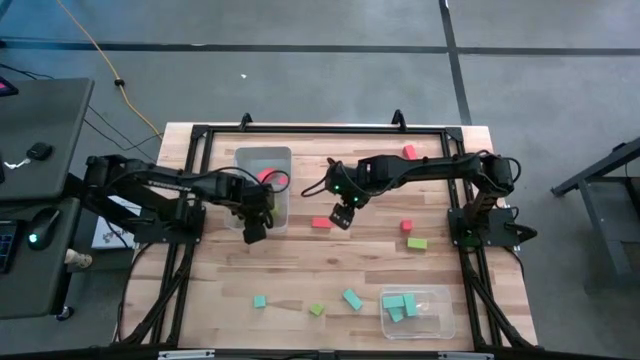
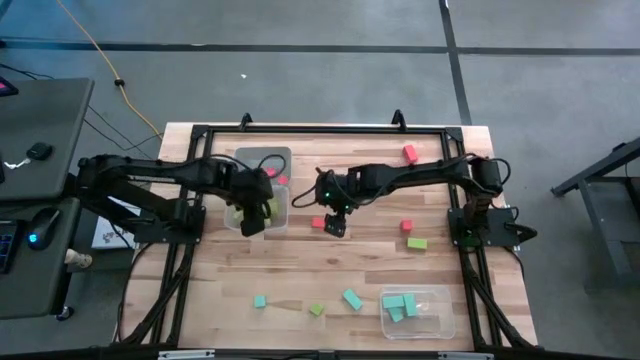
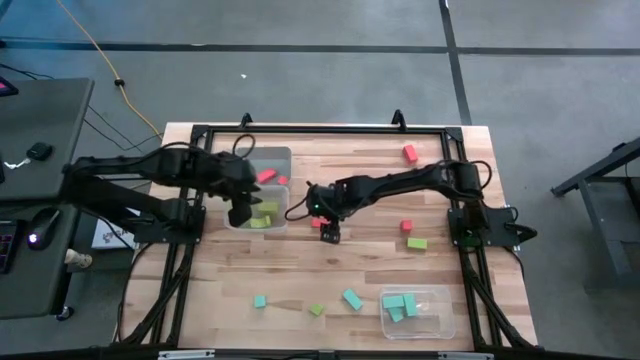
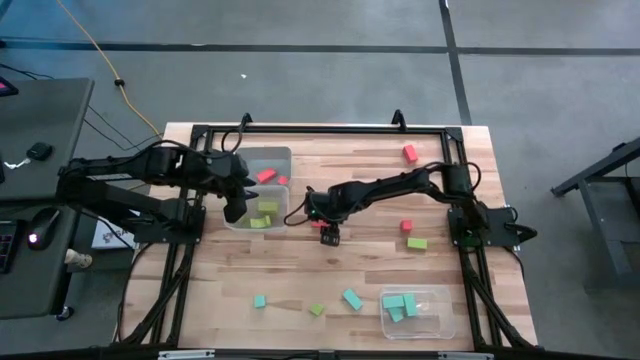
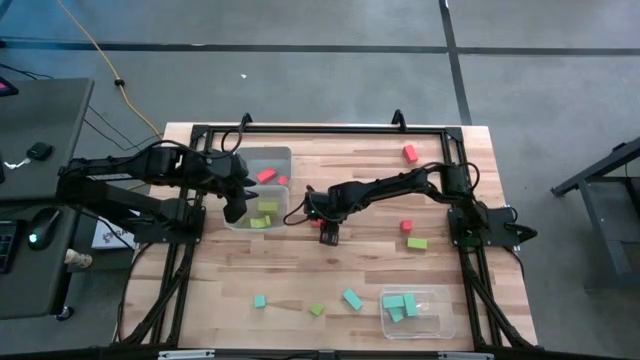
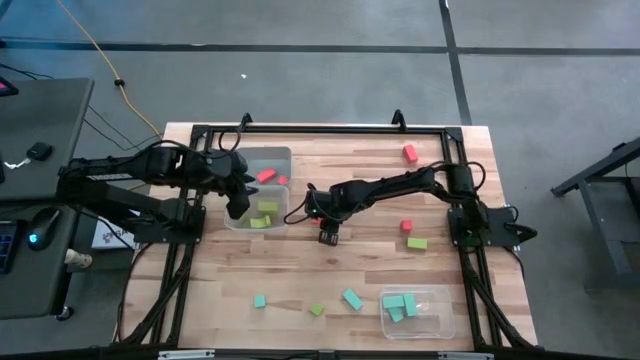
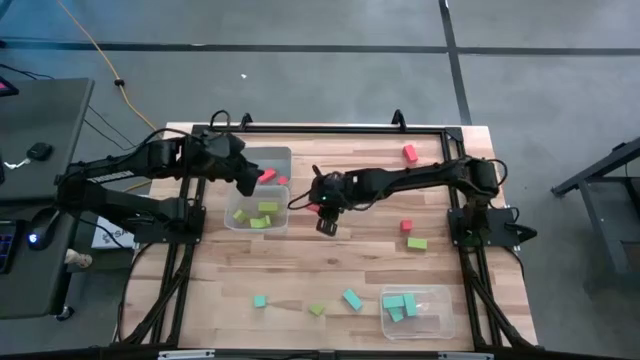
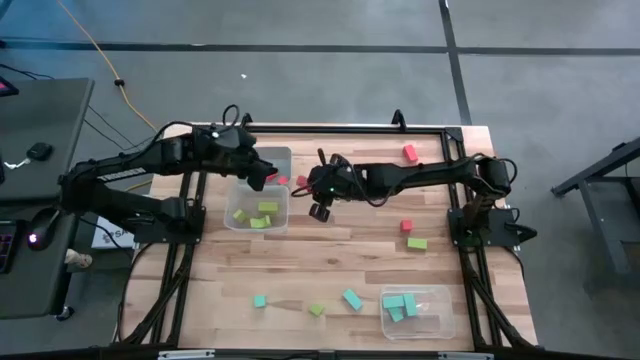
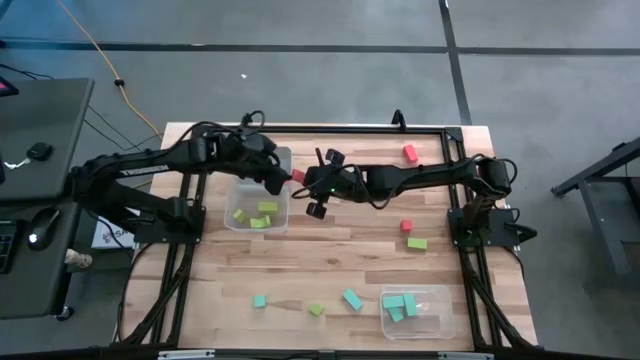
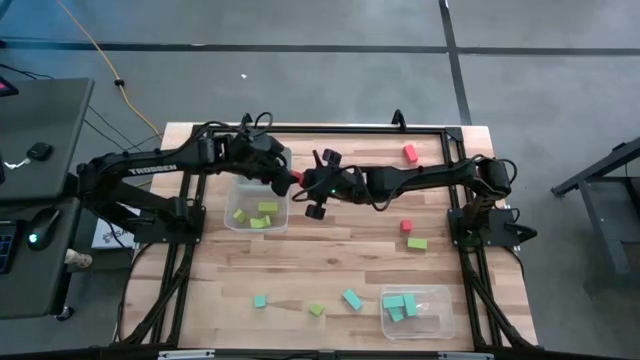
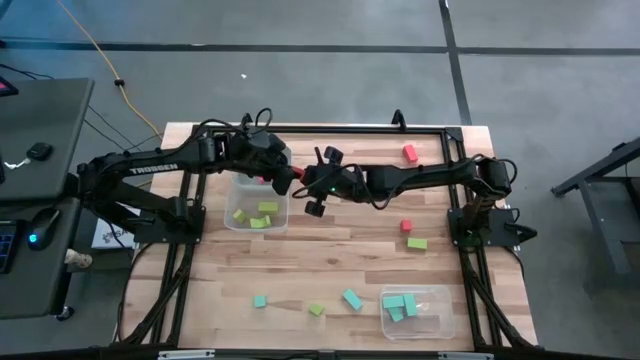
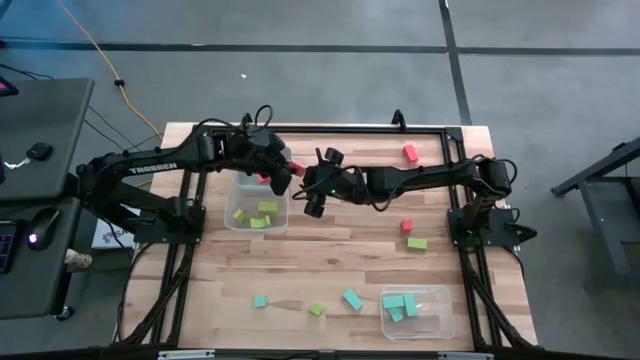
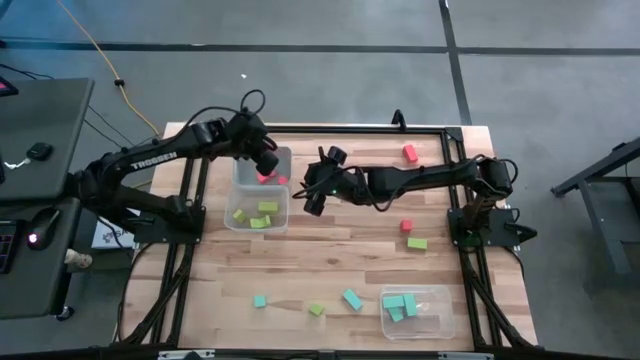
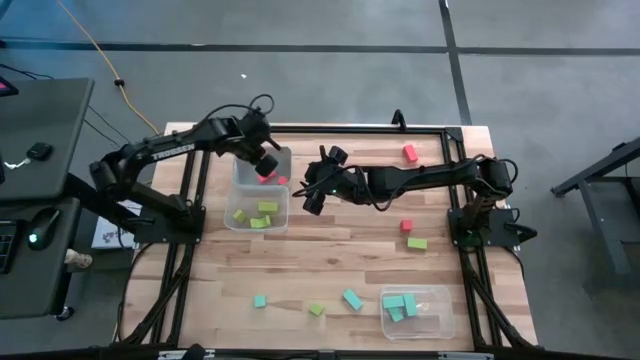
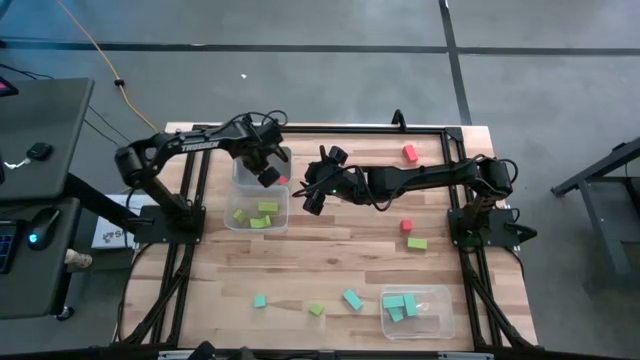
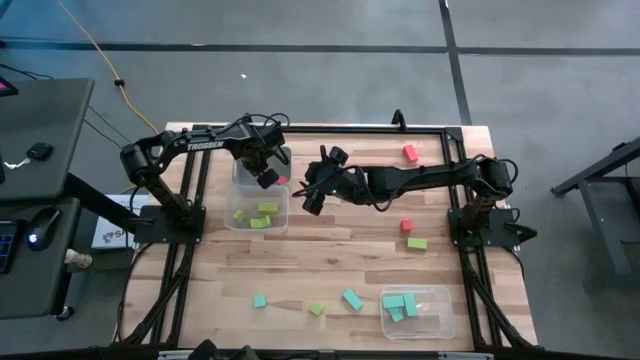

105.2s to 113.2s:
Task: Sort & place blocks by color
Put the orange block into the gray bin

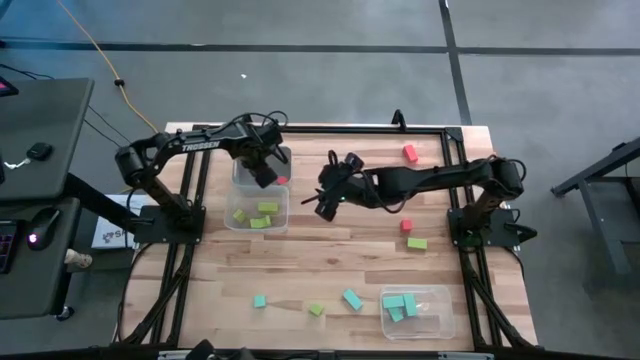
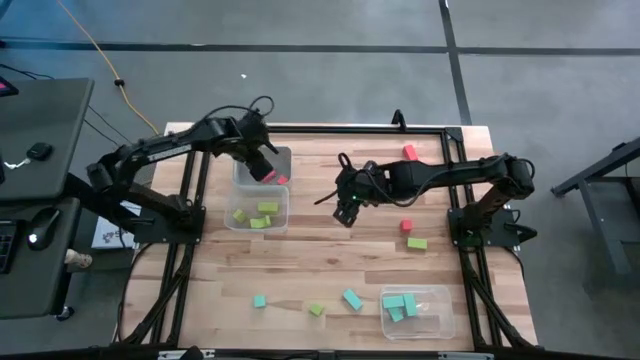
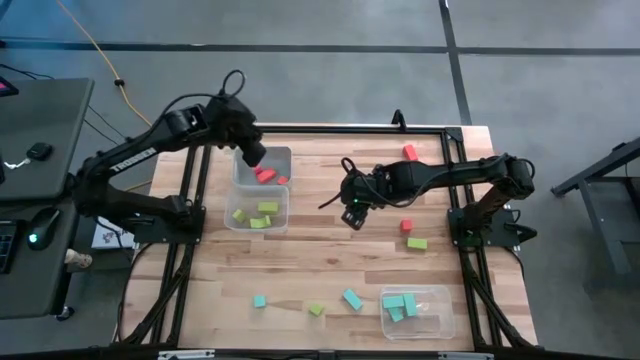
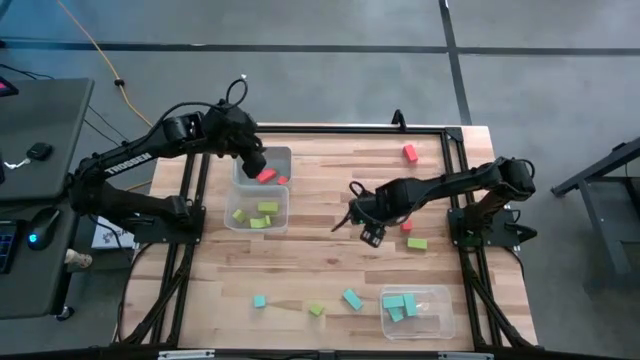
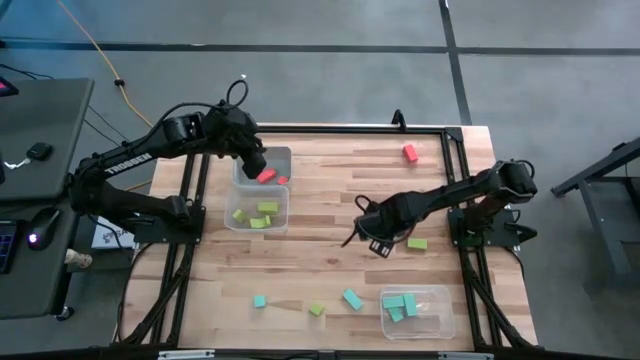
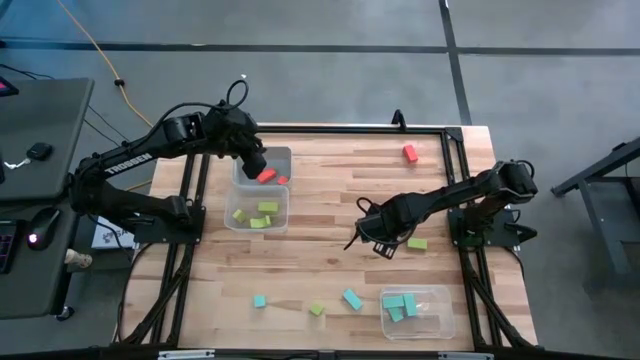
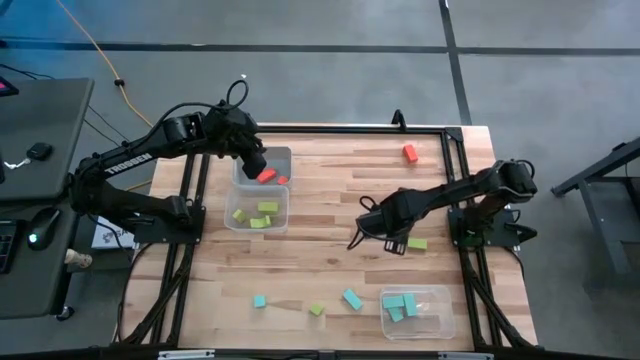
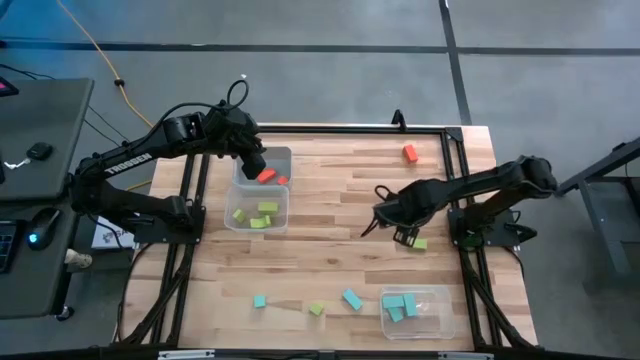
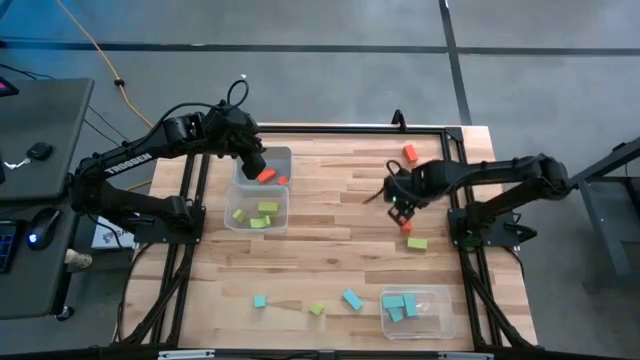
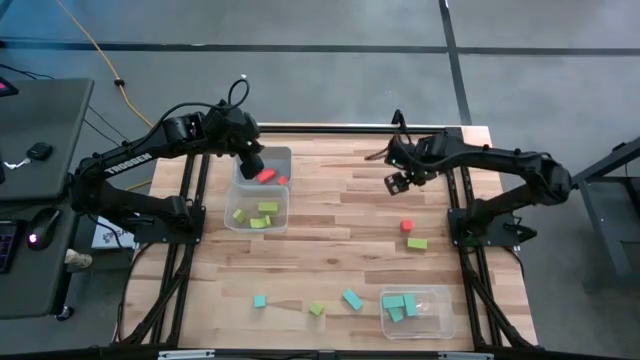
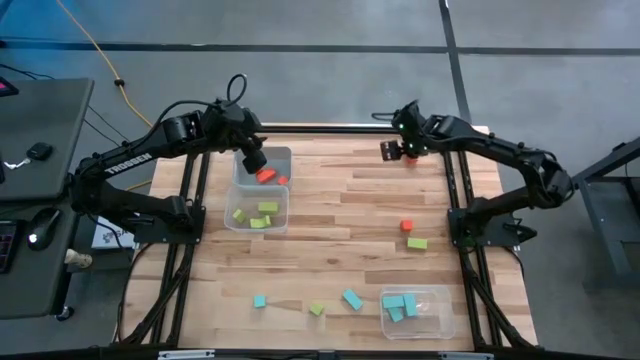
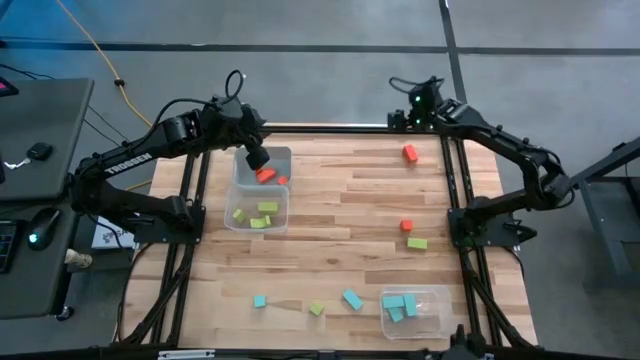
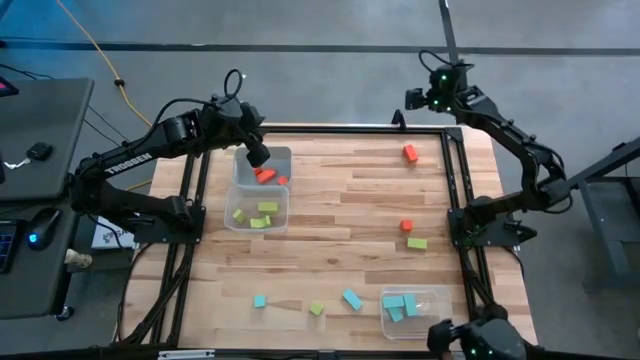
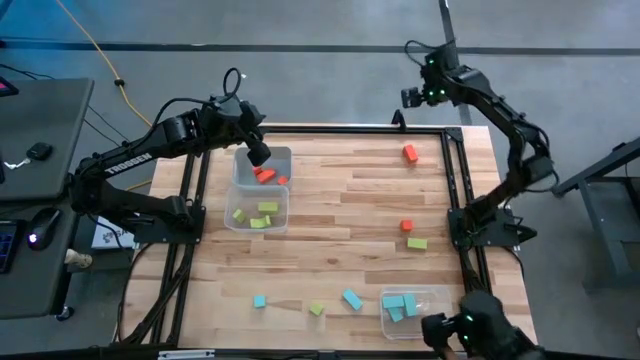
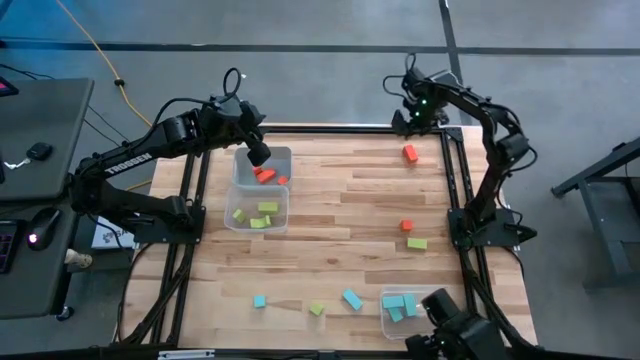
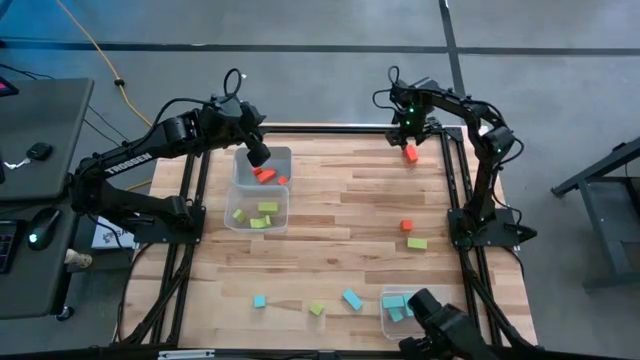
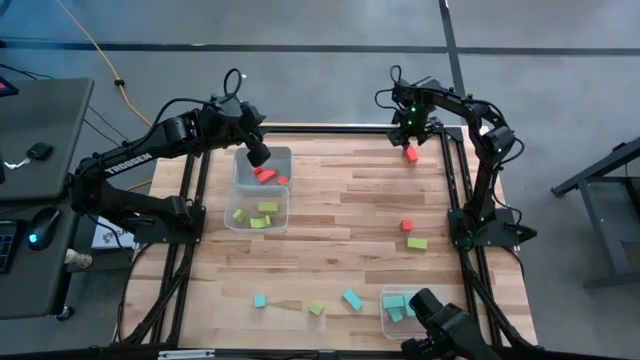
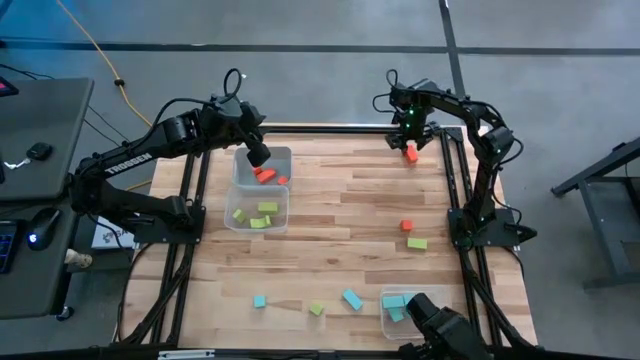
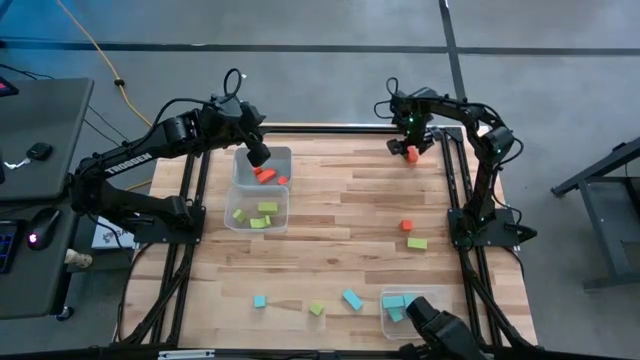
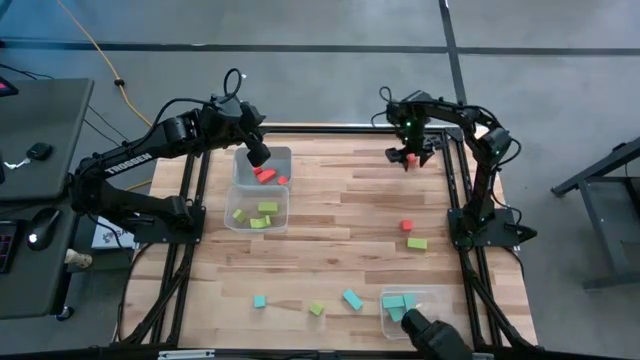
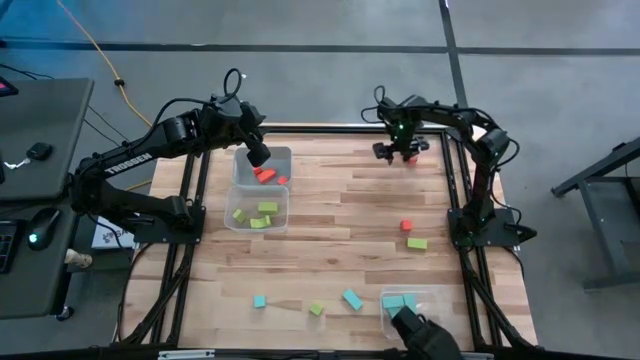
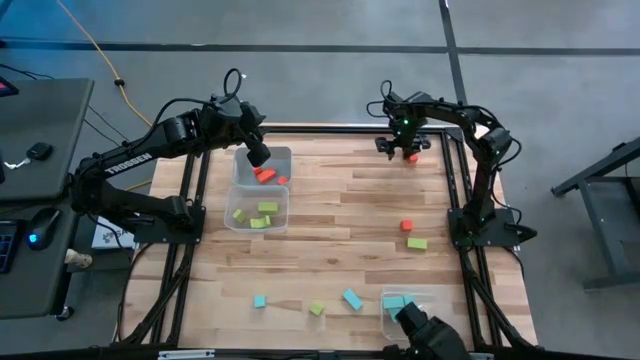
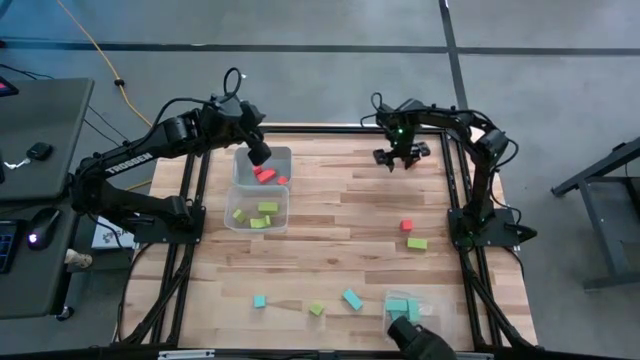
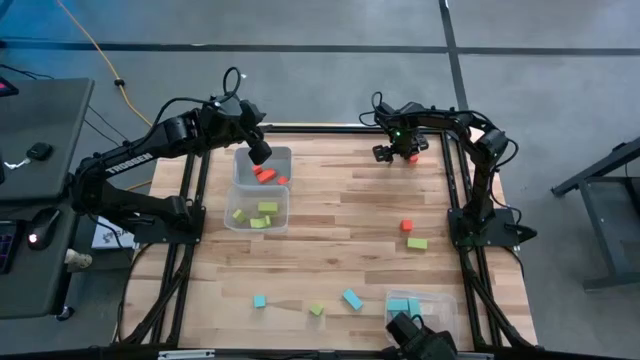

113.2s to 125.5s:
Put the orange block into the gray bin

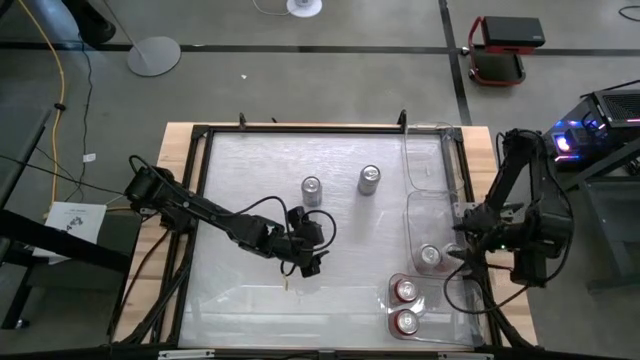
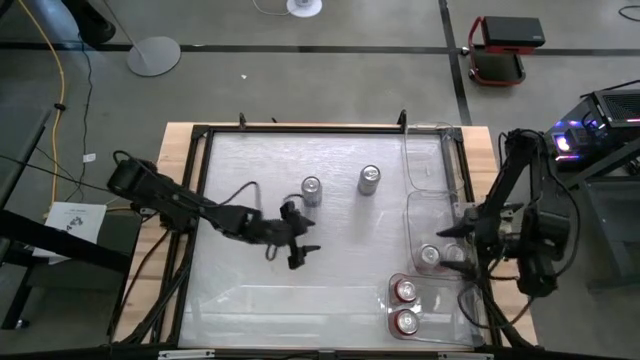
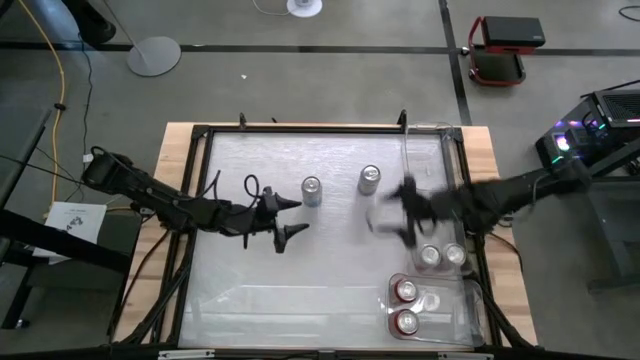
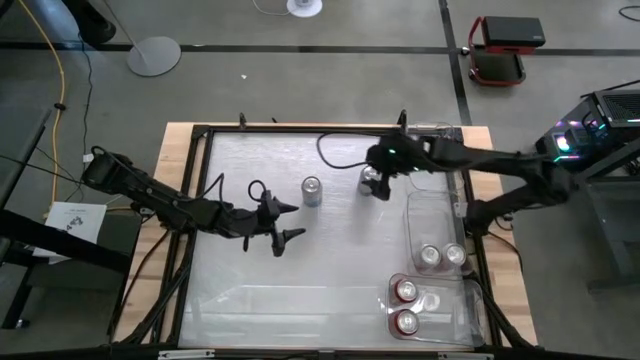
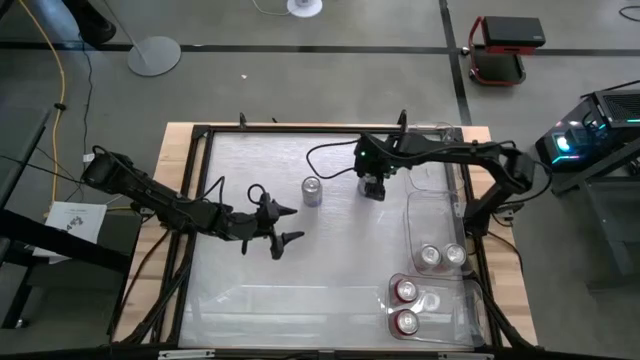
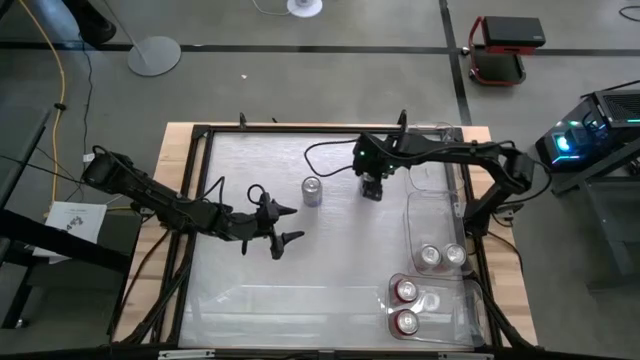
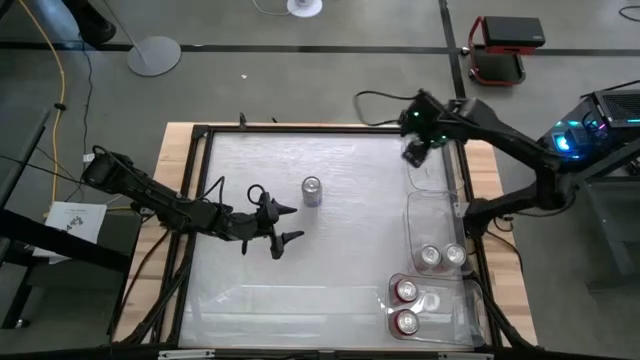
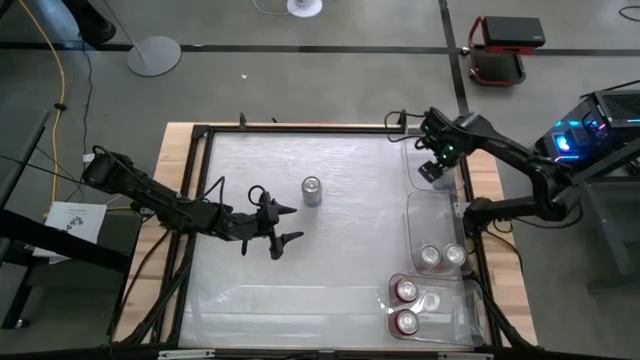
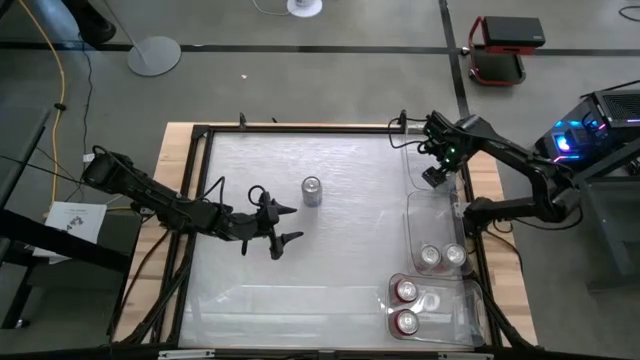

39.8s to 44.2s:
Task: Sort soda cans
Put the right blue-white soda can into the top transparent bin
